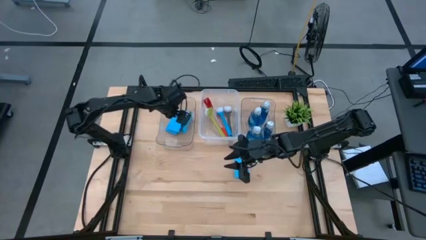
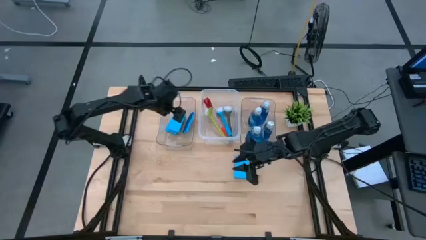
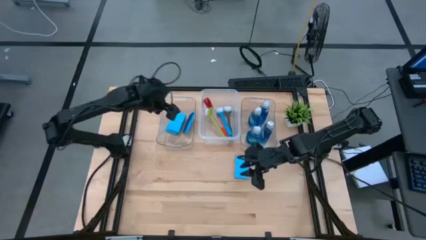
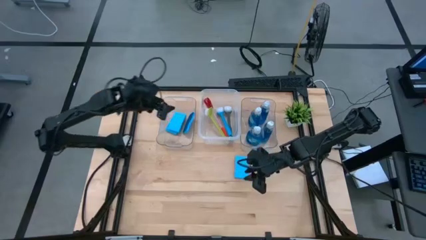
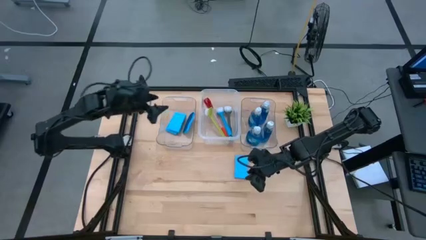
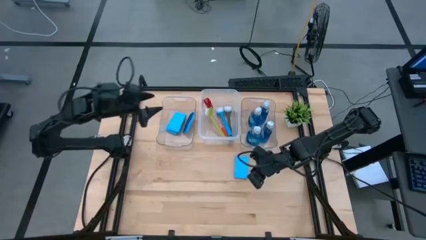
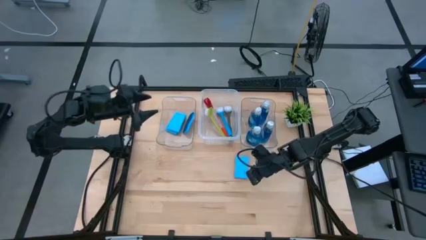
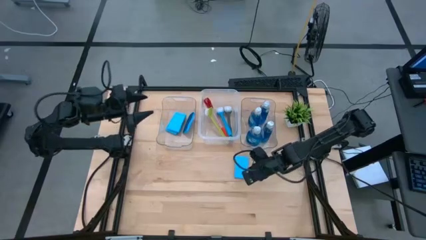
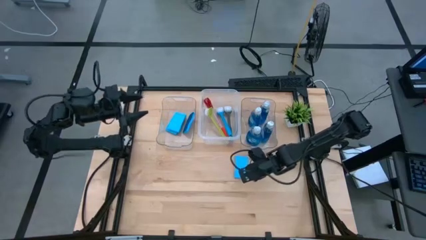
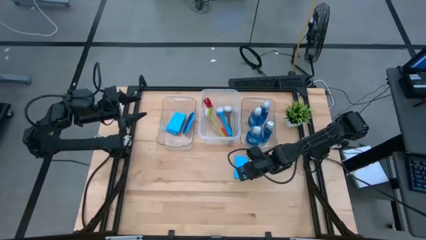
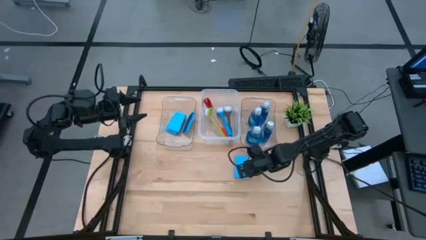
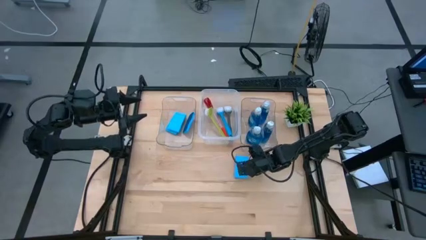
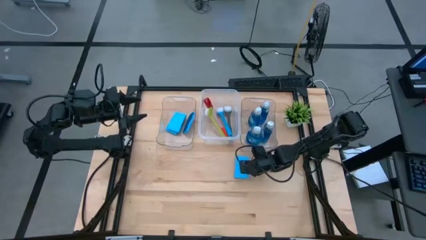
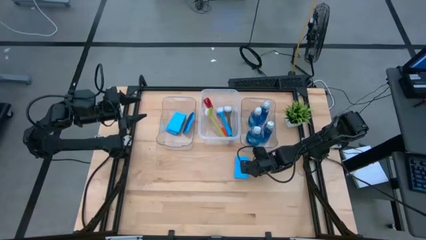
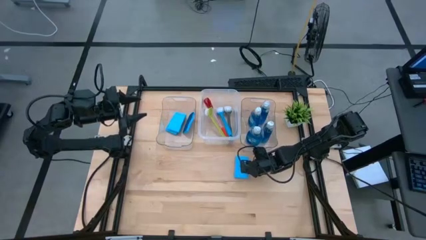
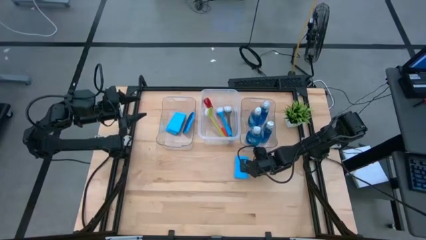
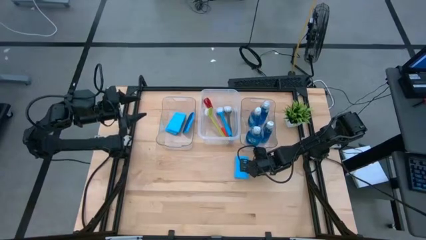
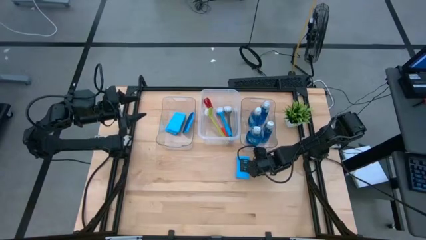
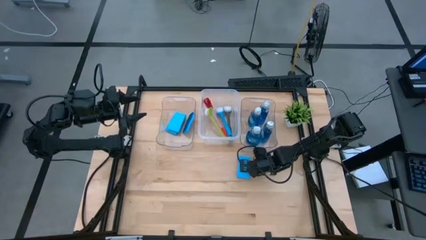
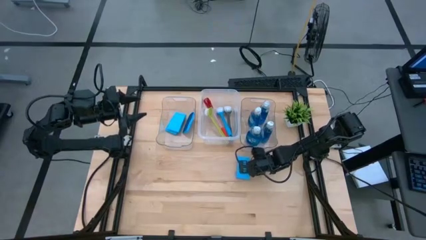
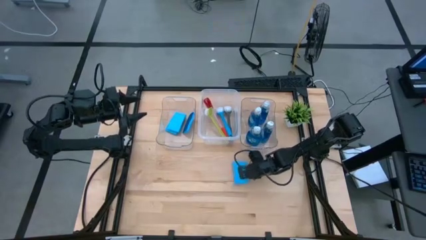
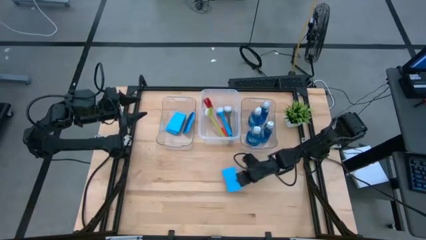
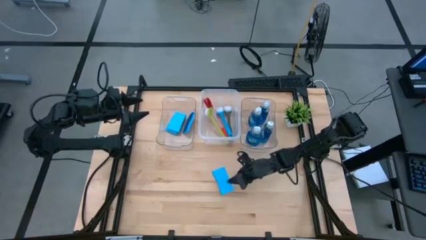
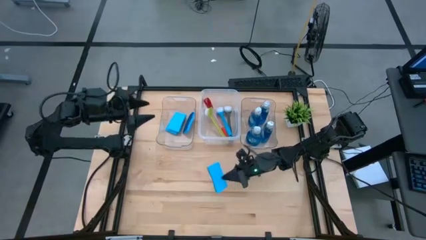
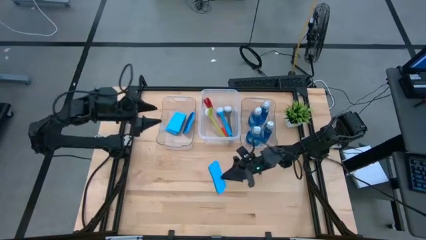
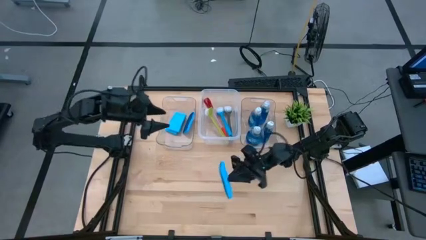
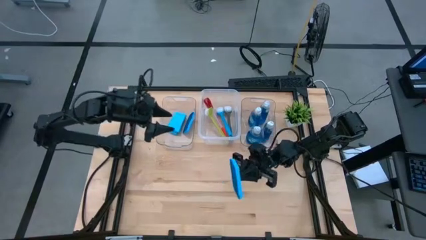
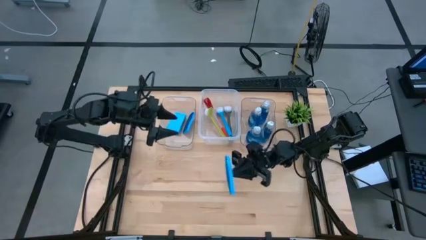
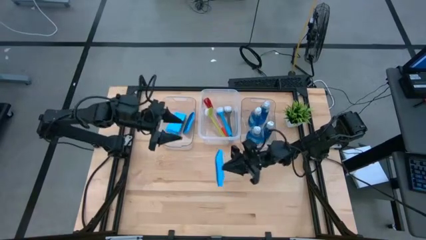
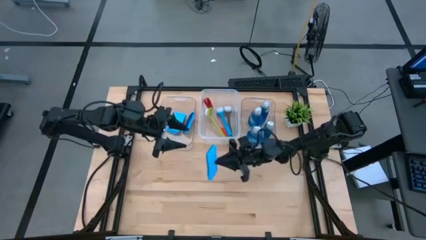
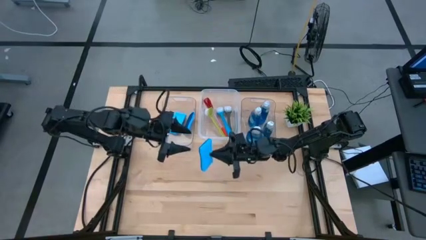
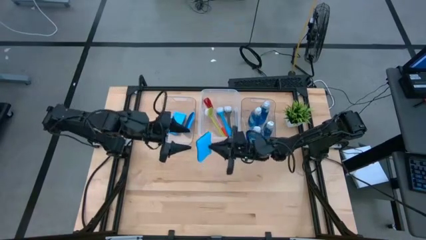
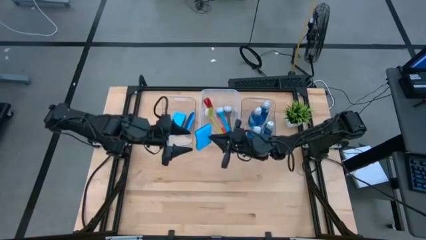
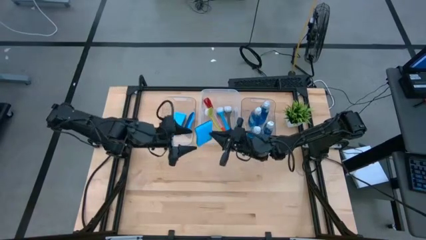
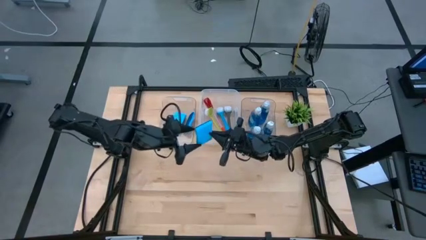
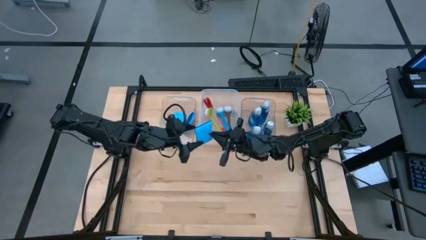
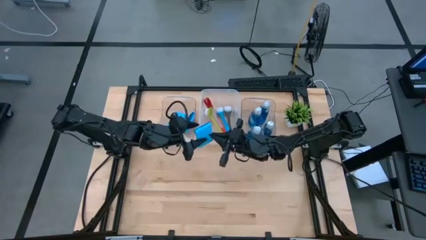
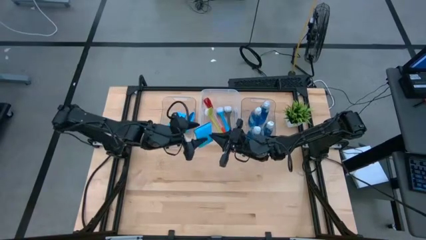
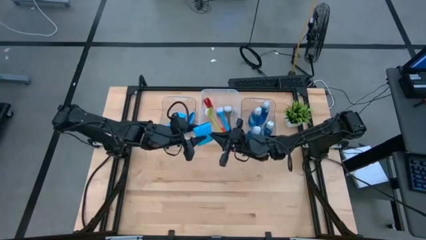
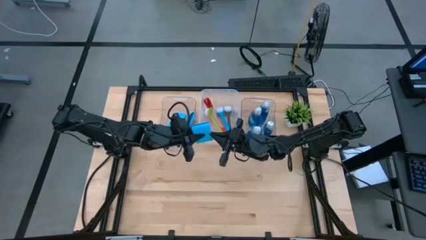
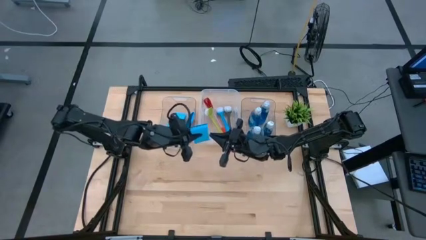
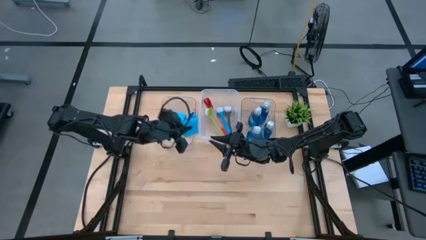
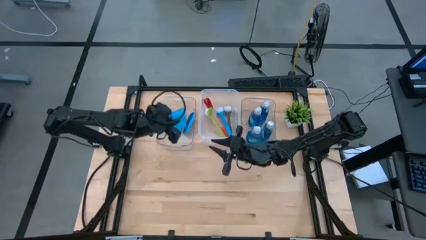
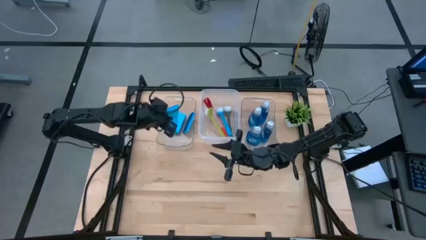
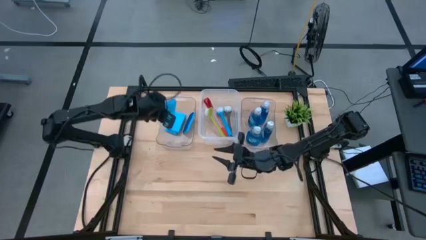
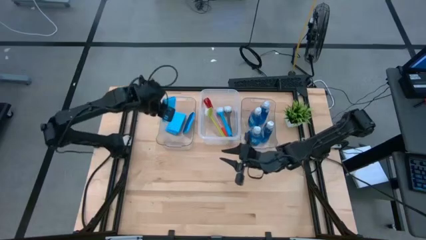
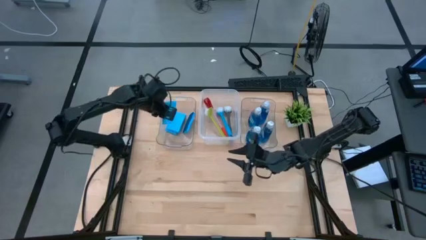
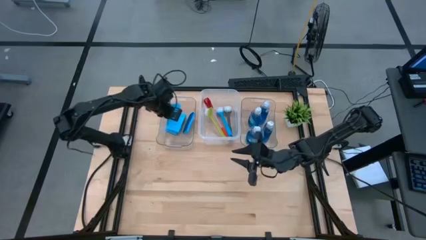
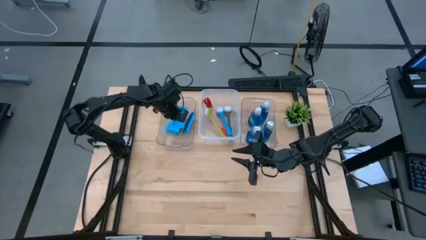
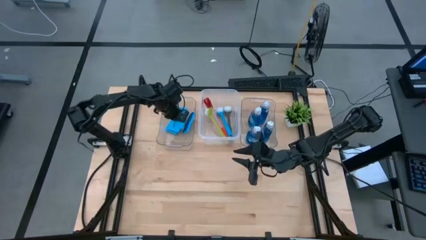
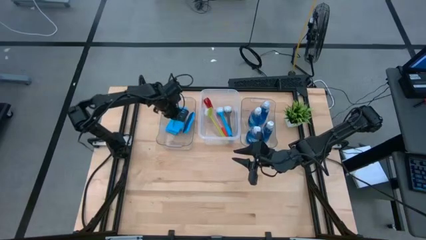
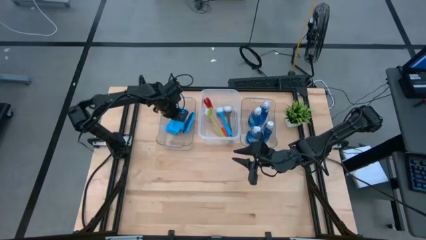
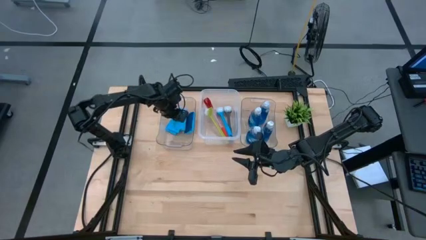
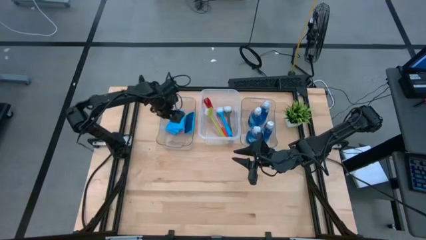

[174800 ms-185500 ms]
Task: Pick & Place Kitchen Sink Supplies
Put the blue sponge into the left transparent bin

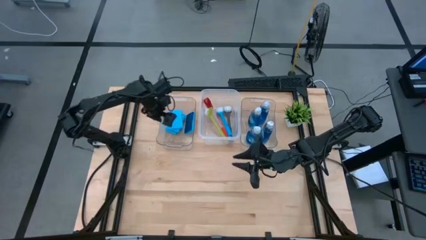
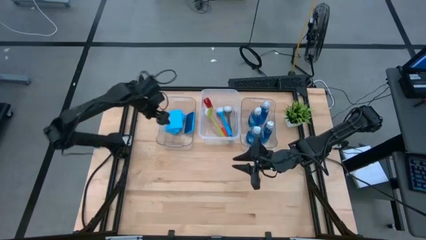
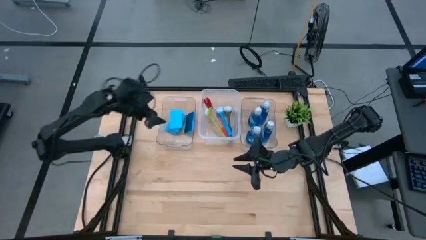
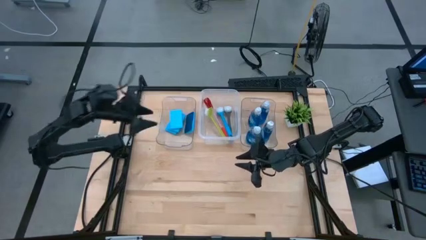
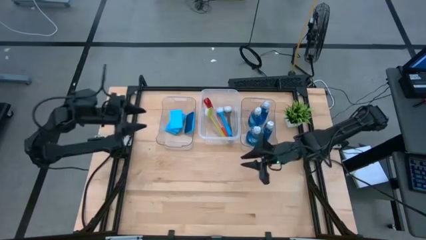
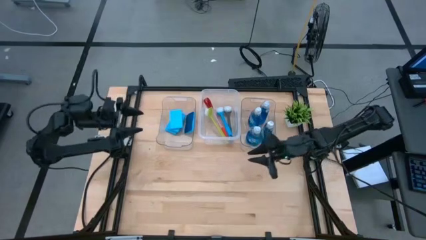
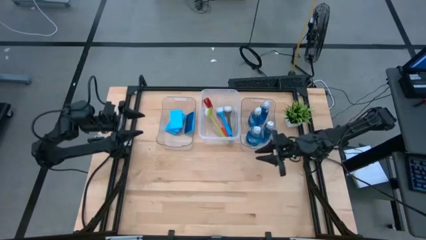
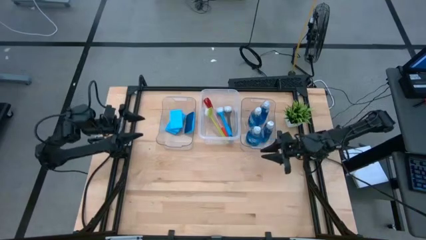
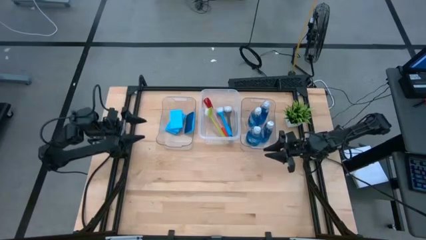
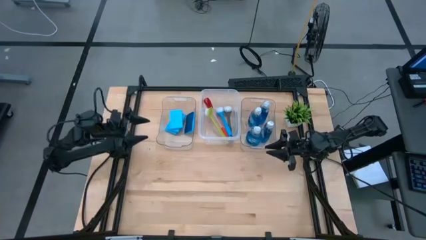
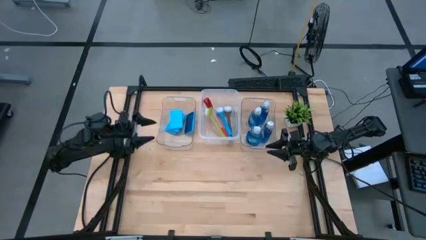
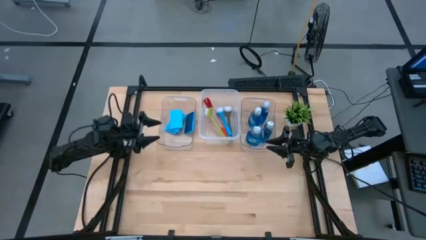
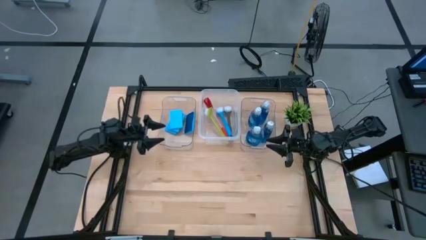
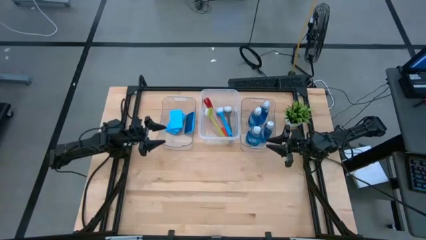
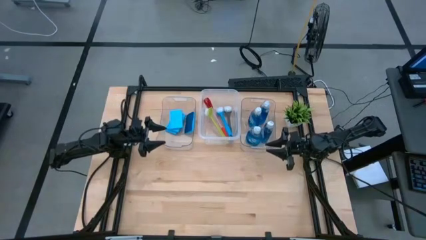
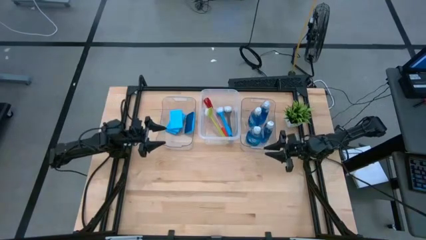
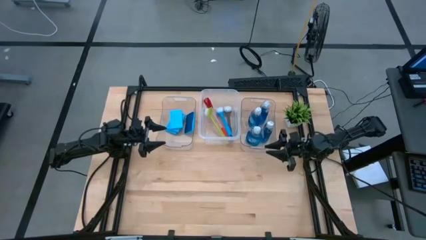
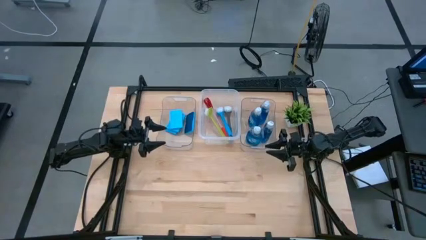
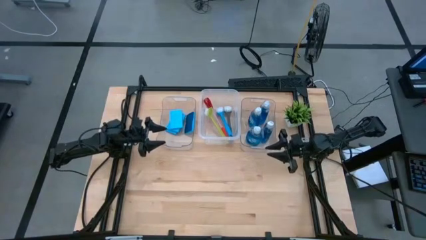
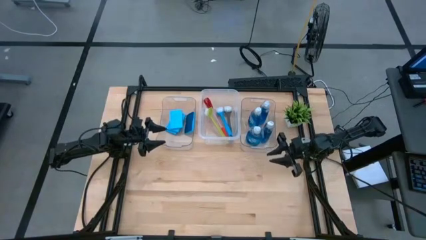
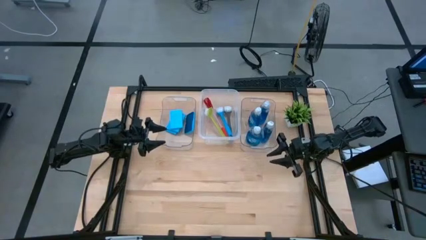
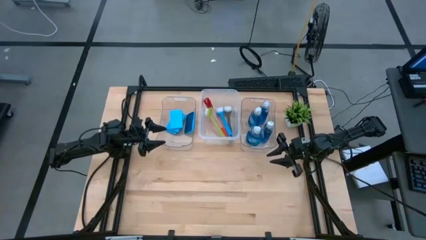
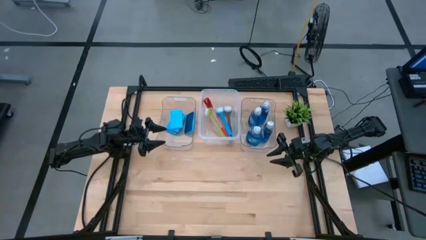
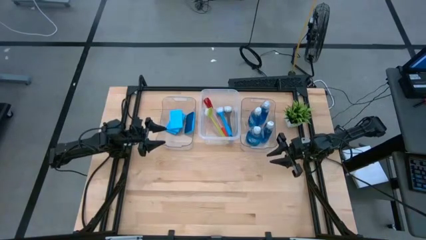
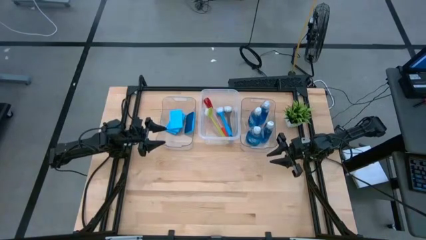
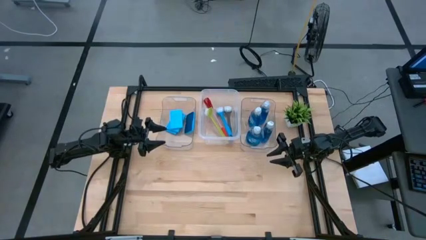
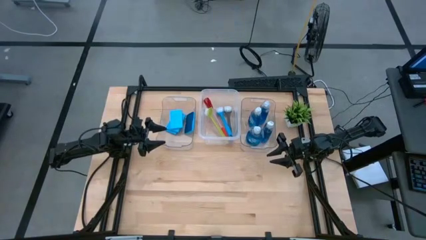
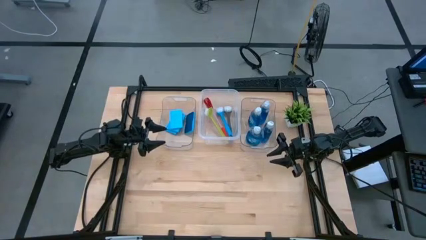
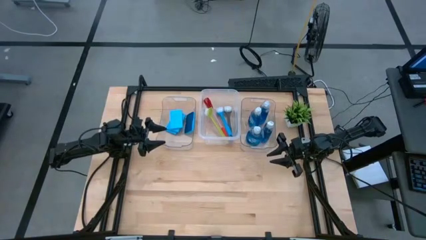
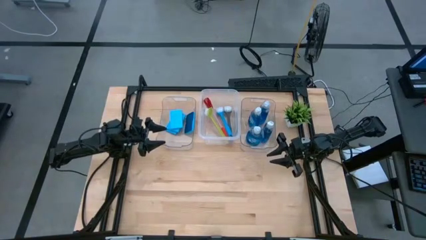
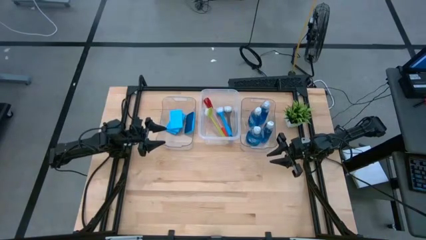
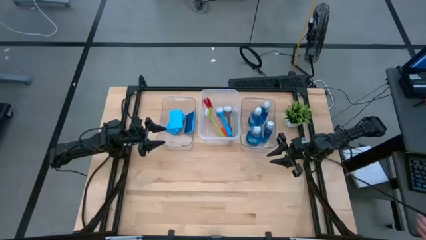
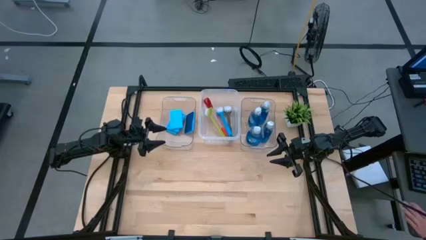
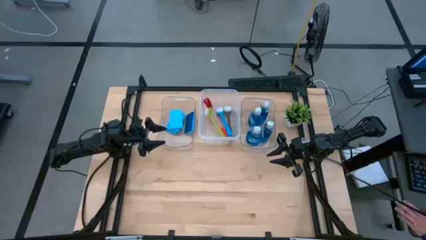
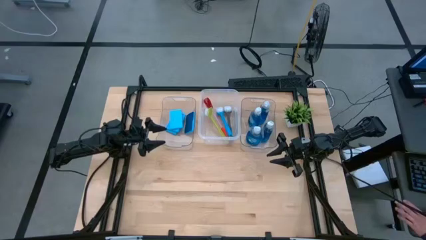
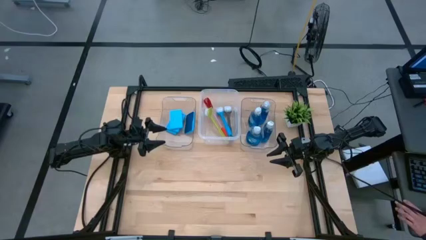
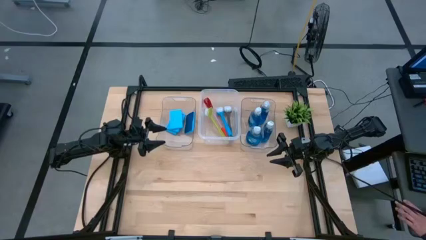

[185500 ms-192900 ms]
Return to Home Position
